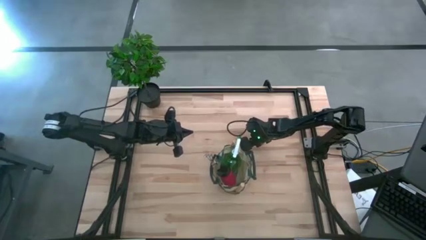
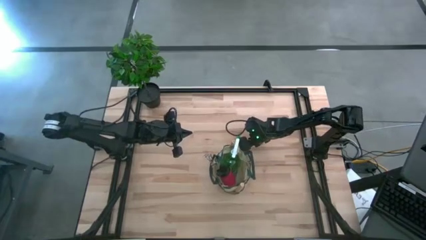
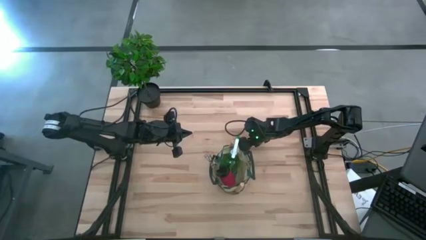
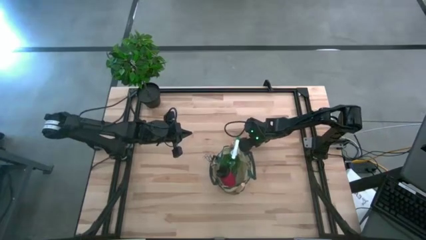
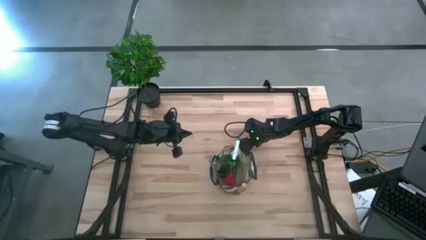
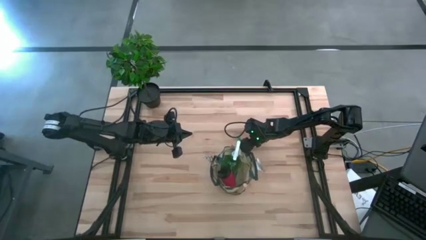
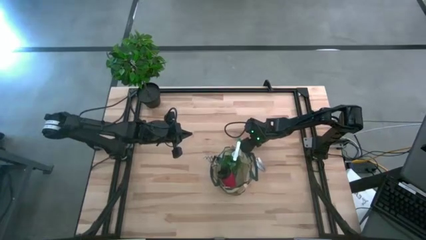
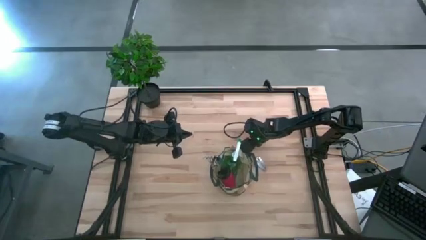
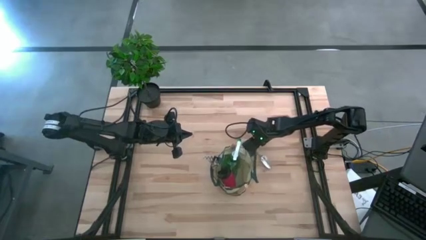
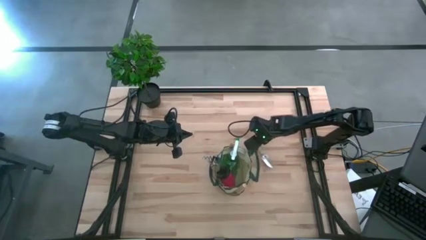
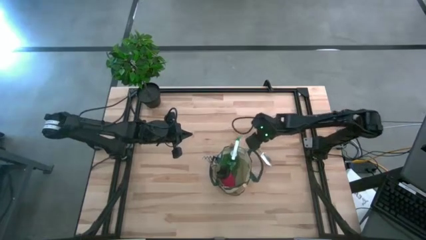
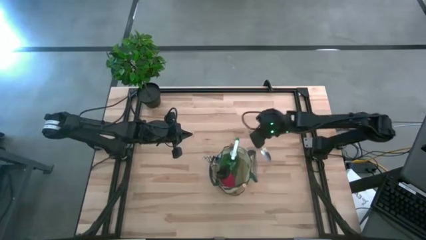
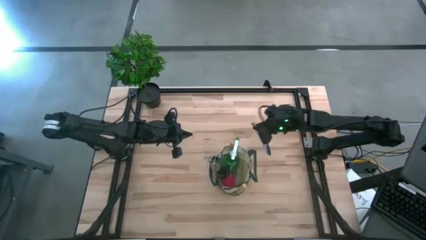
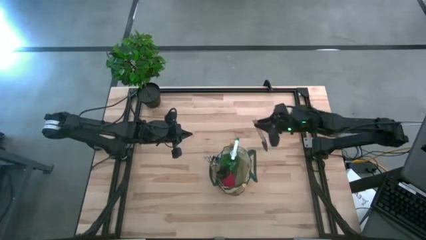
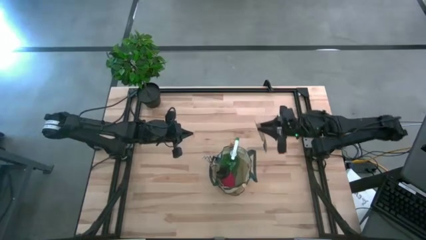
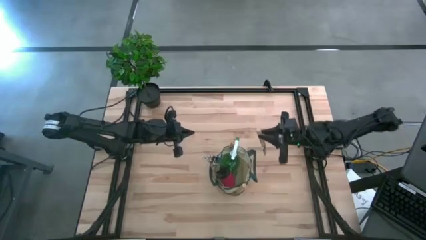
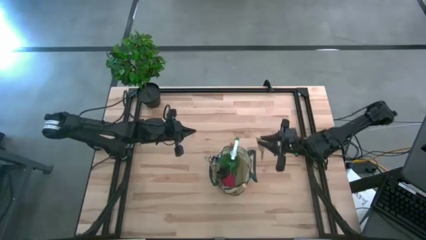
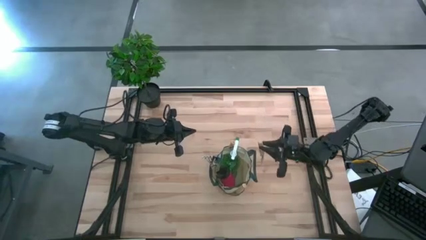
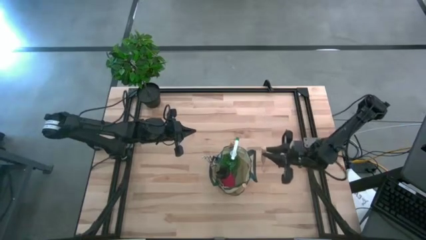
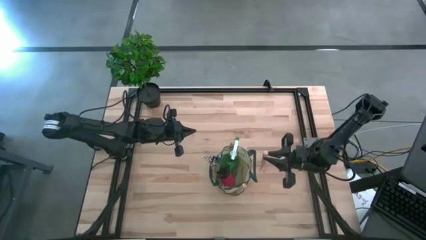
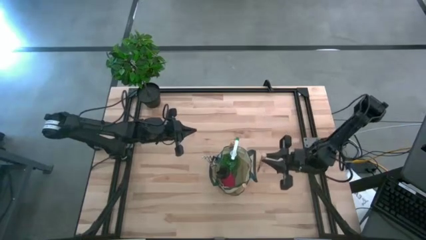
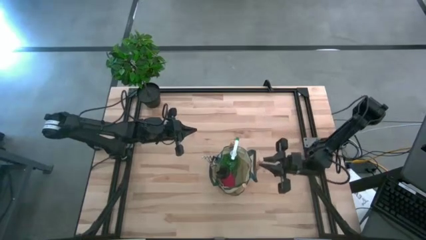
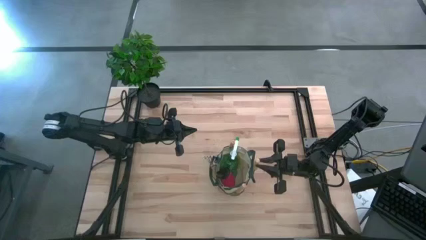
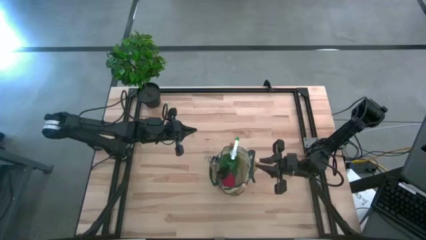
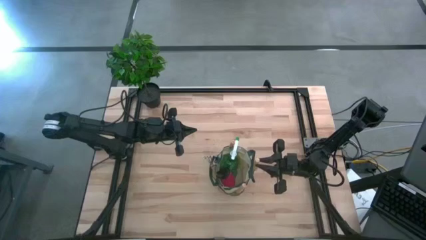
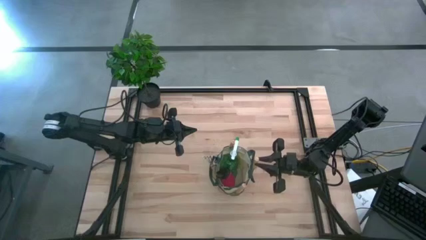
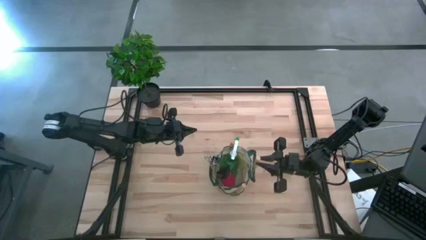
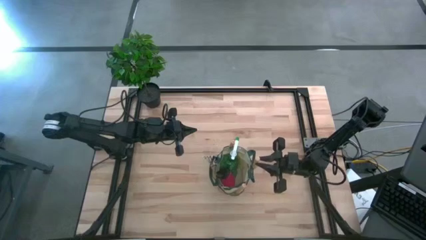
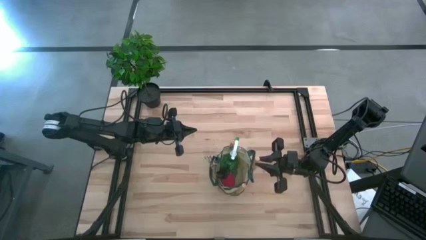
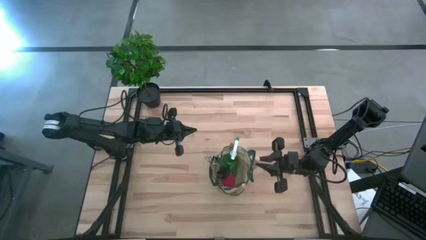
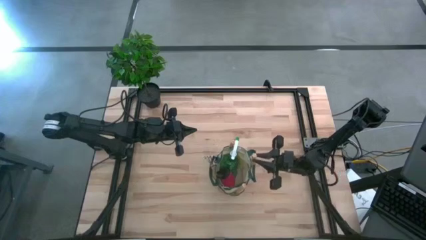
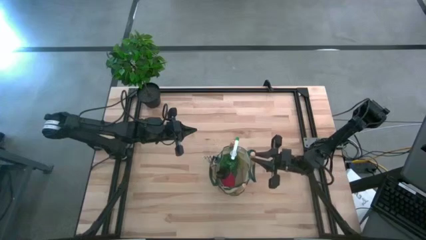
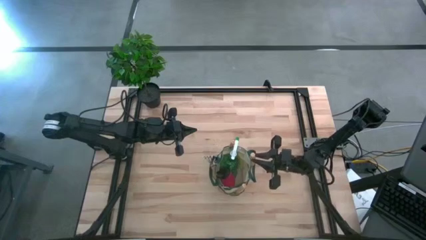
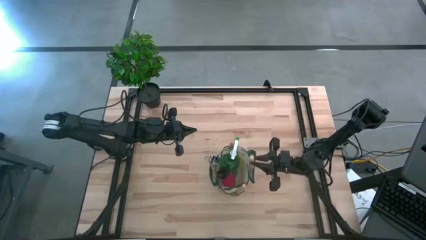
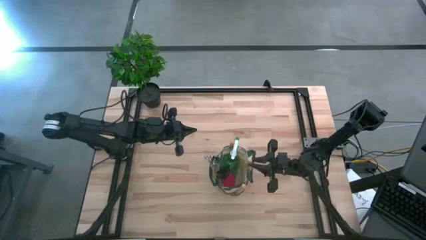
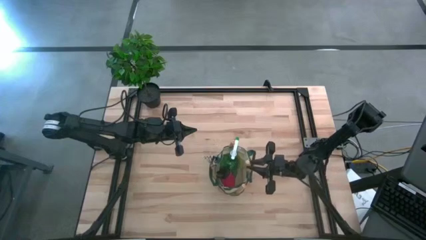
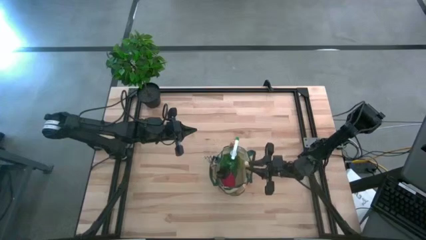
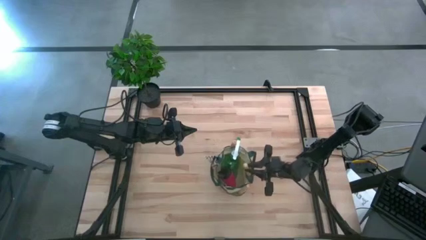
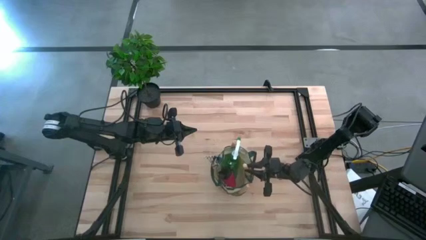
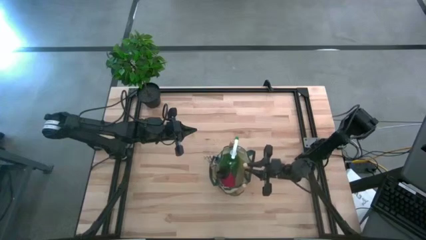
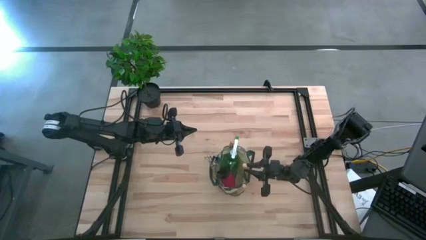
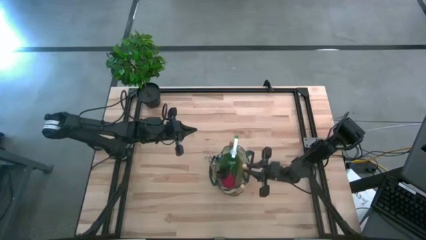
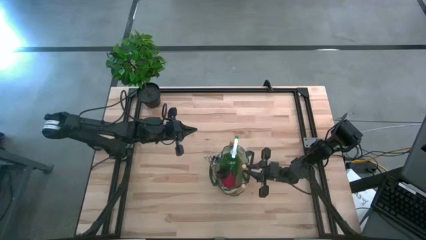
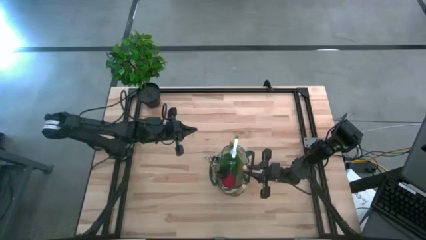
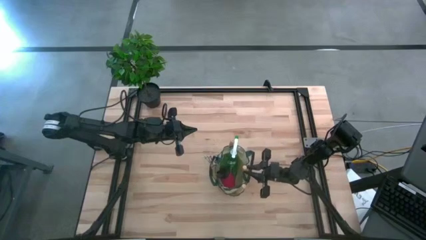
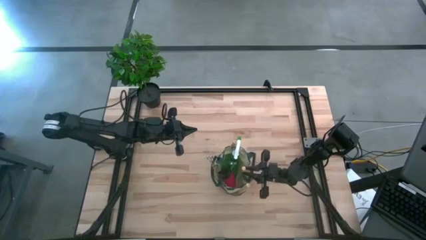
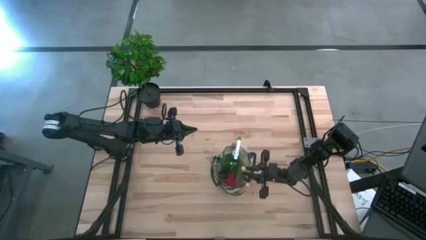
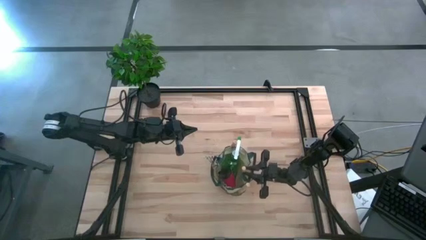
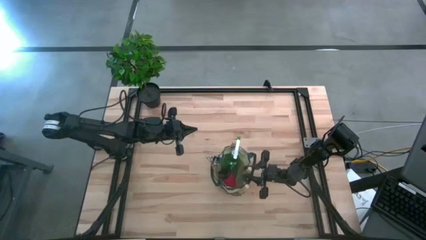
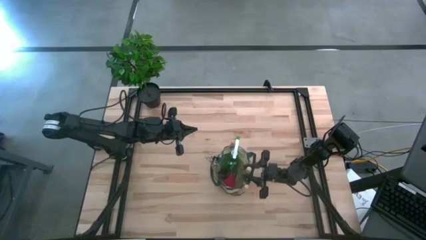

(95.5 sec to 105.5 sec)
Task: Pick & Place Garden tools in Gardening bag
Put the trowel into the gardening bag

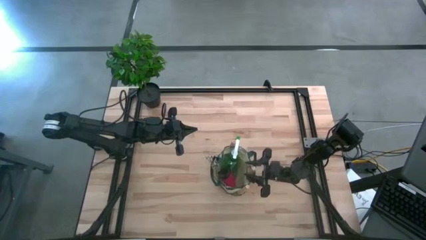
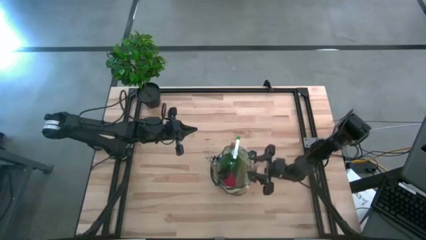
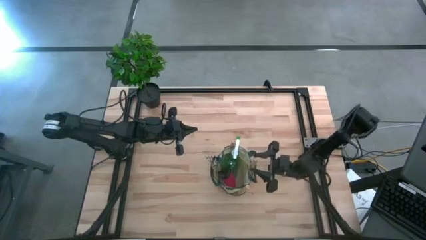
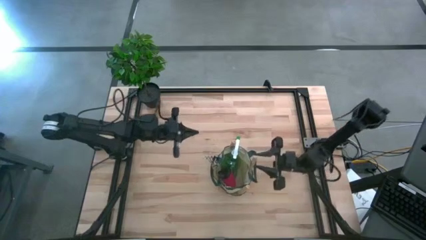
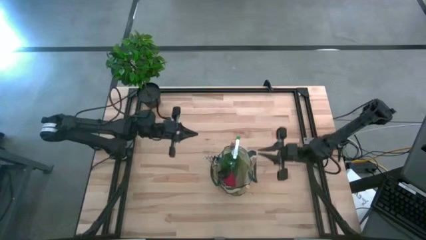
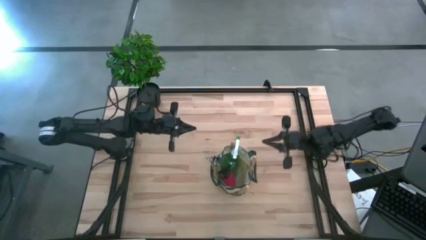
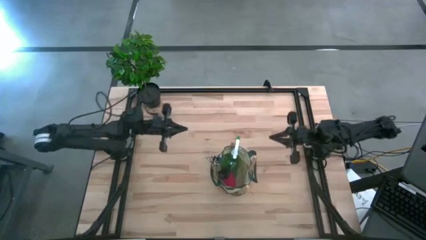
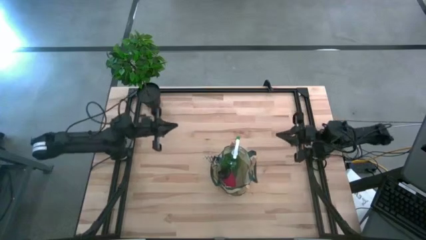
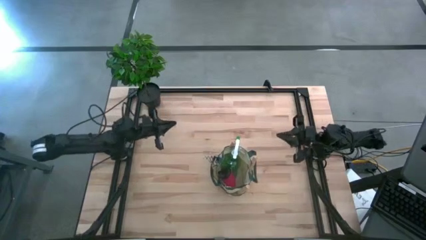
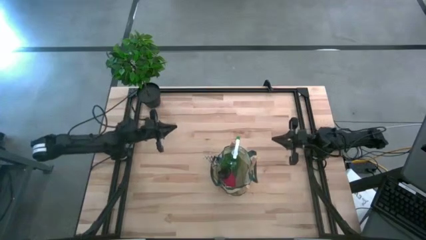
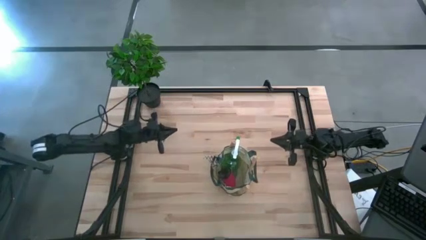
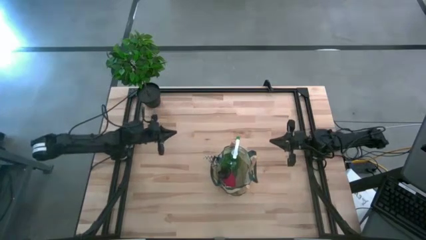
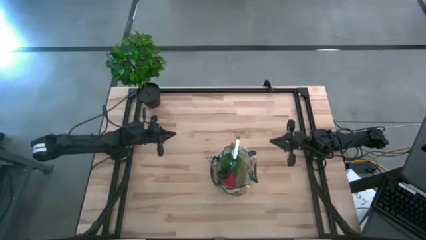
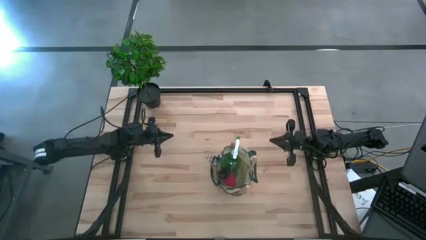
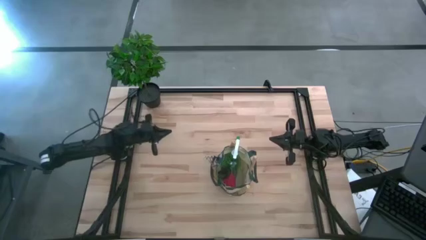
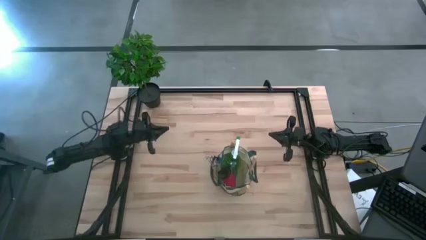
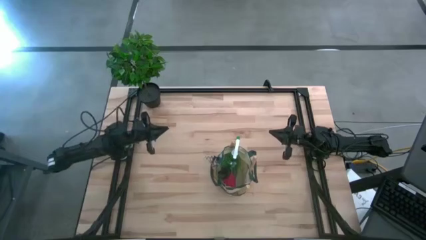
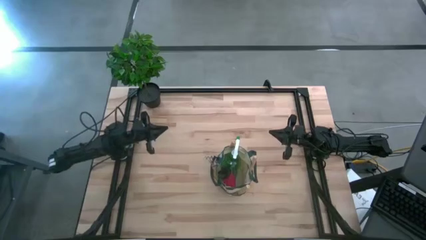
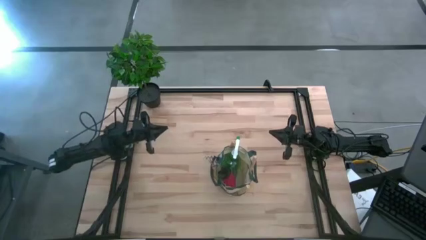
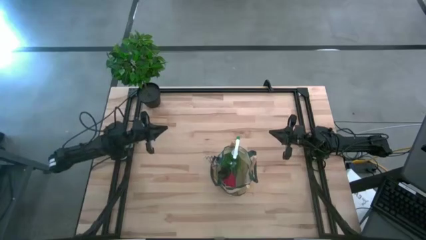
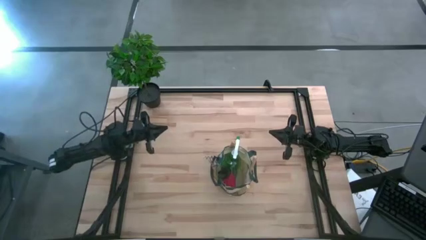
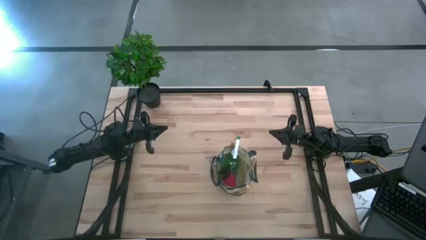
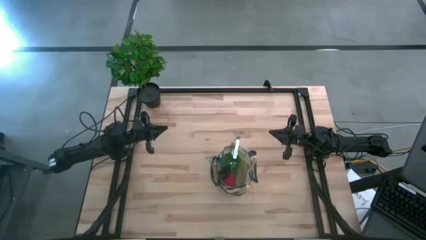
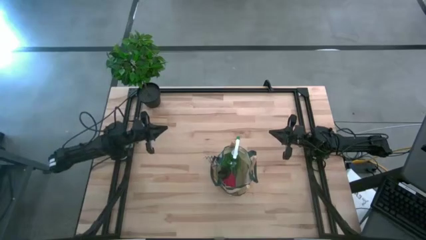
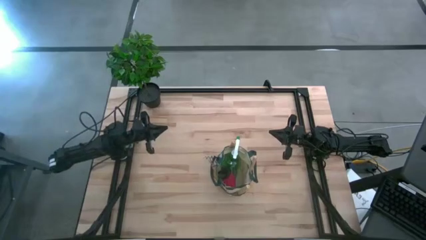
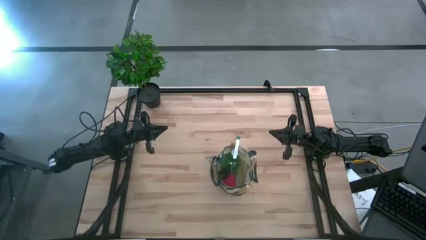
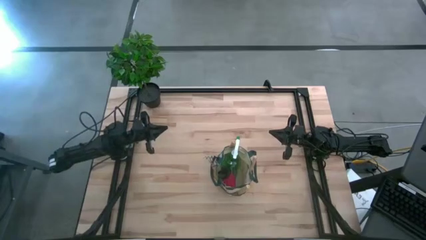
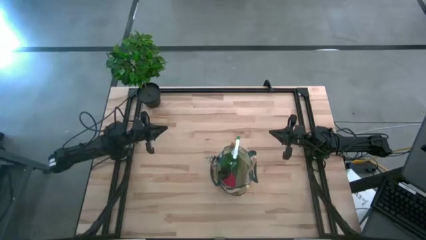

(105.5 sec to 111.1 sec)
Return to Home Position
